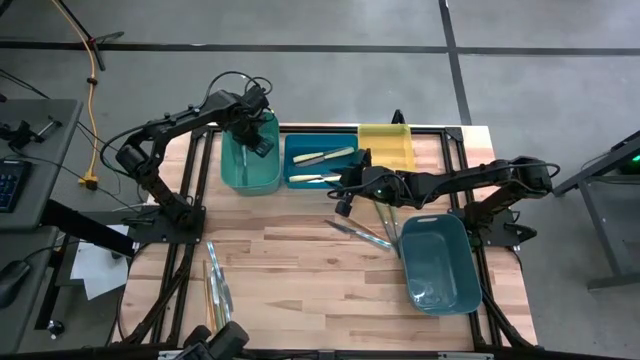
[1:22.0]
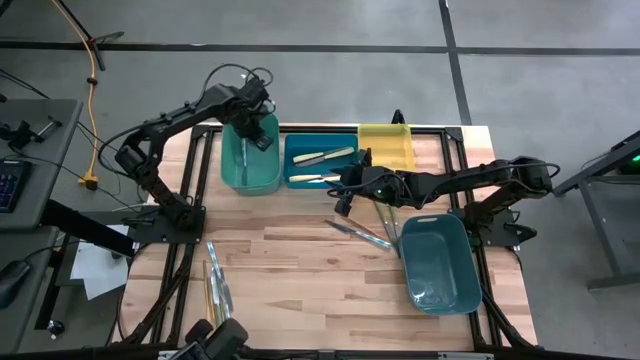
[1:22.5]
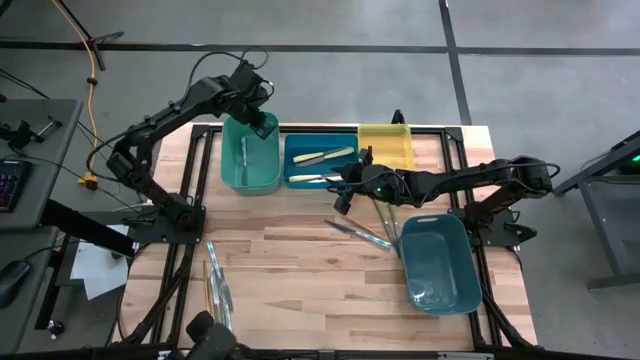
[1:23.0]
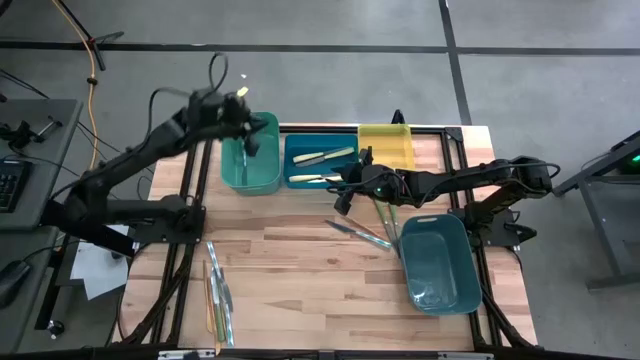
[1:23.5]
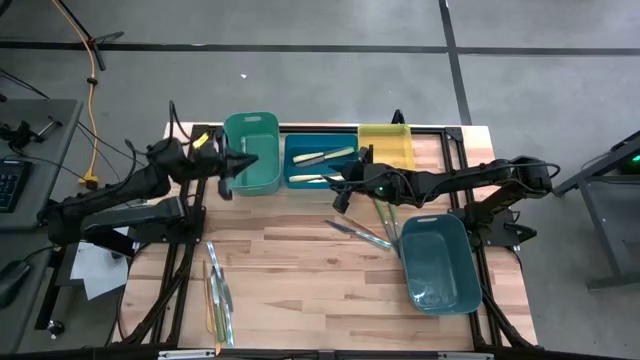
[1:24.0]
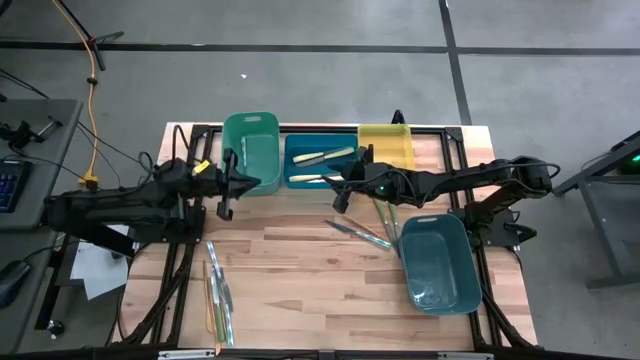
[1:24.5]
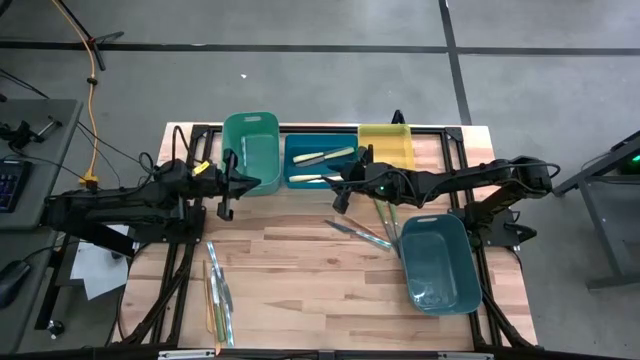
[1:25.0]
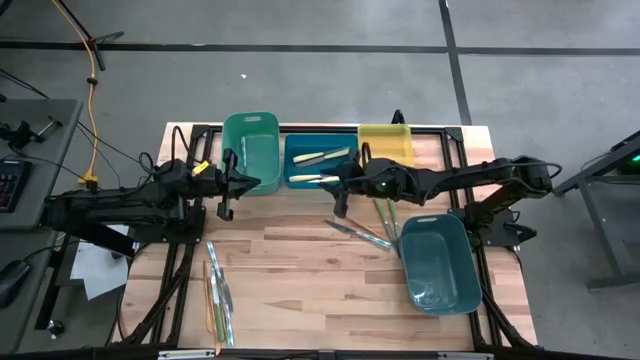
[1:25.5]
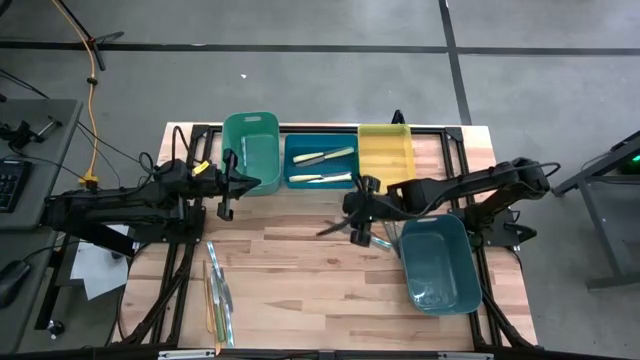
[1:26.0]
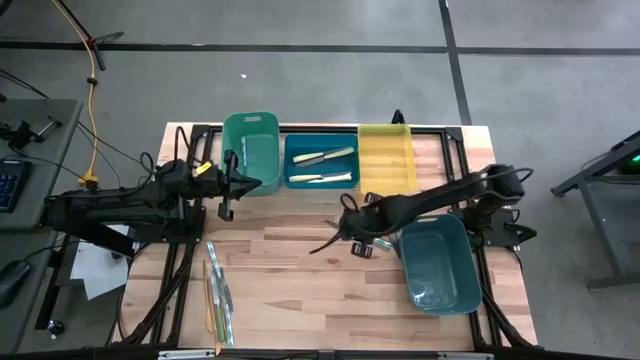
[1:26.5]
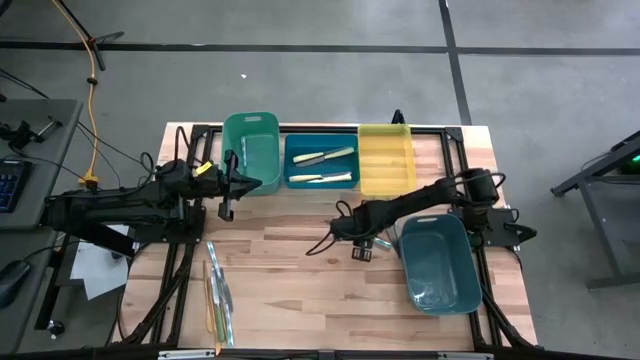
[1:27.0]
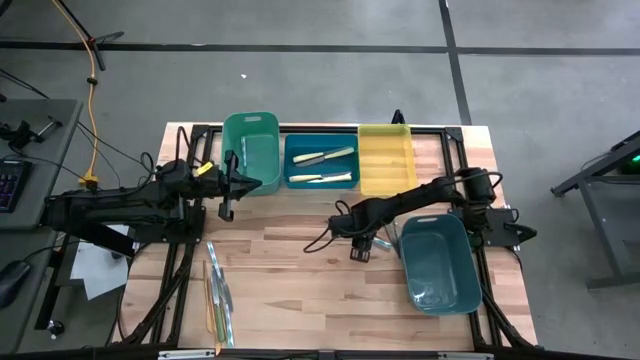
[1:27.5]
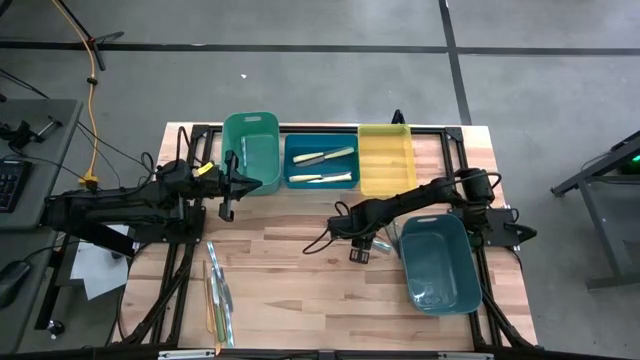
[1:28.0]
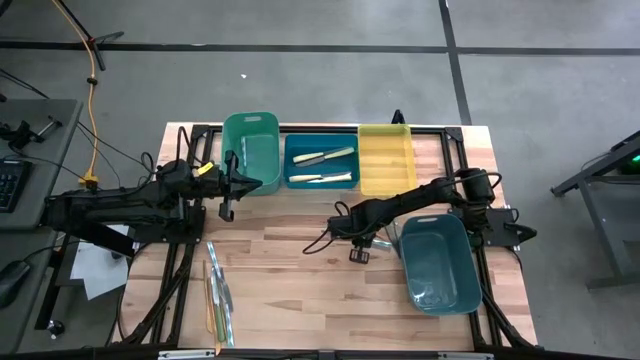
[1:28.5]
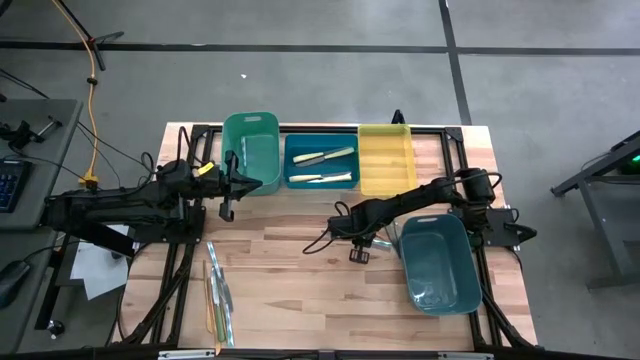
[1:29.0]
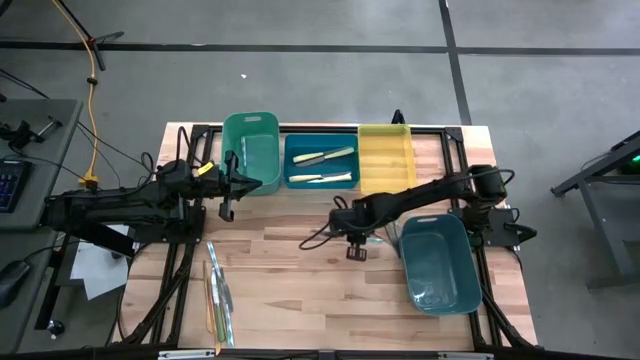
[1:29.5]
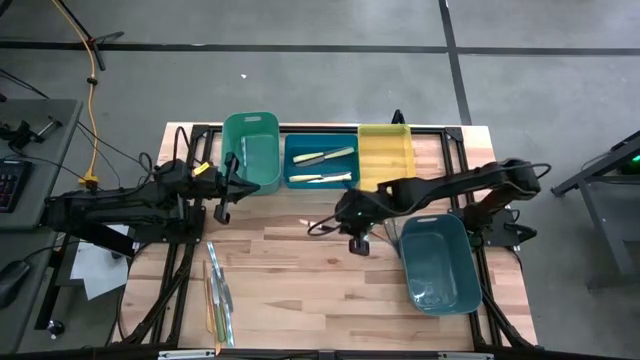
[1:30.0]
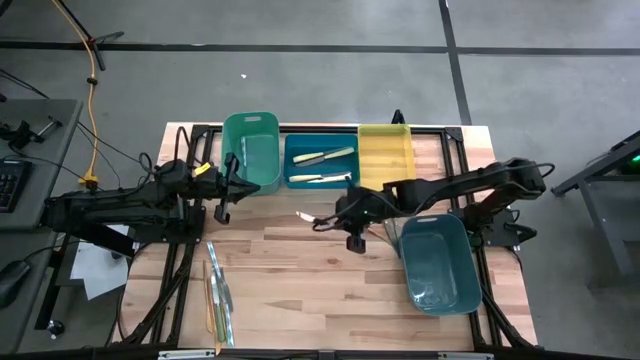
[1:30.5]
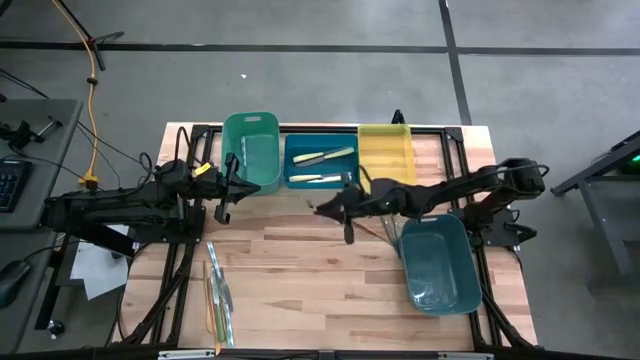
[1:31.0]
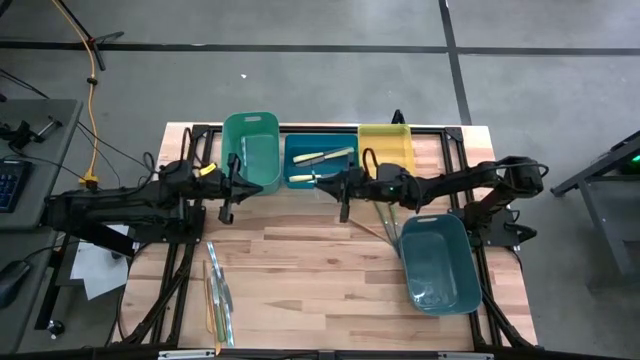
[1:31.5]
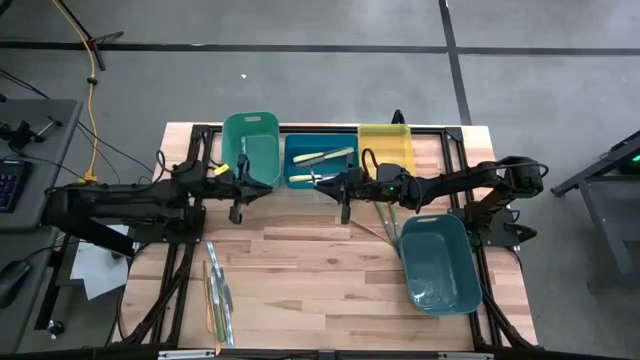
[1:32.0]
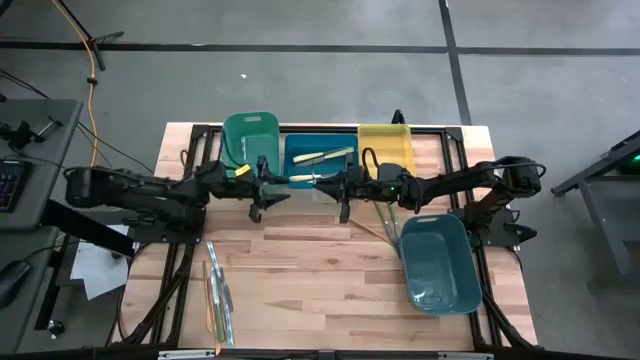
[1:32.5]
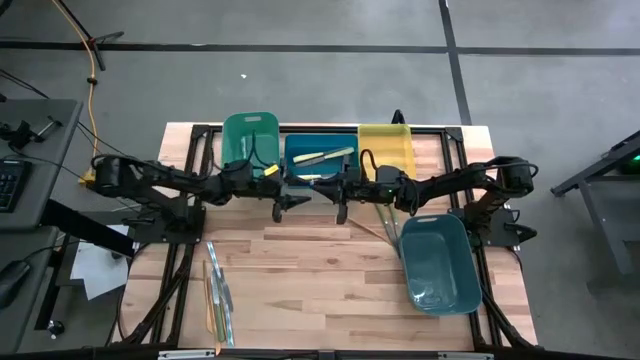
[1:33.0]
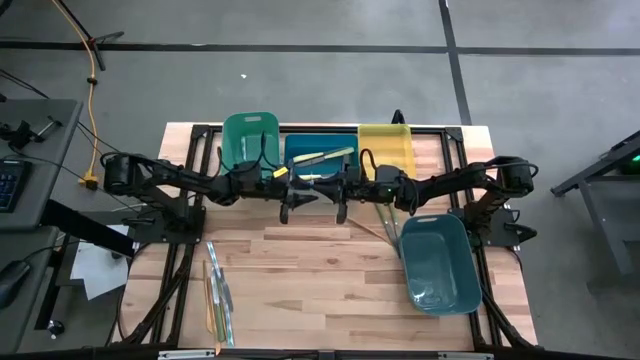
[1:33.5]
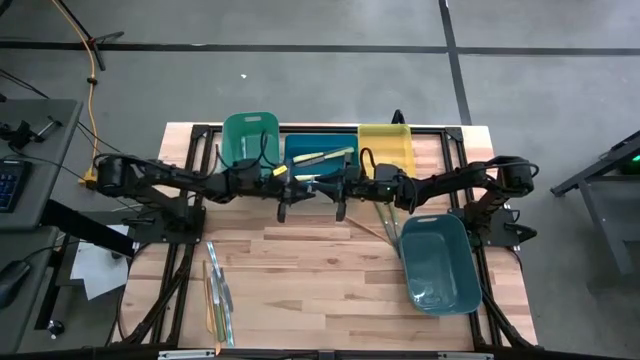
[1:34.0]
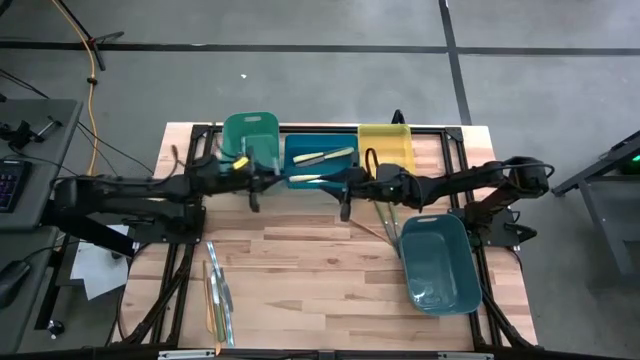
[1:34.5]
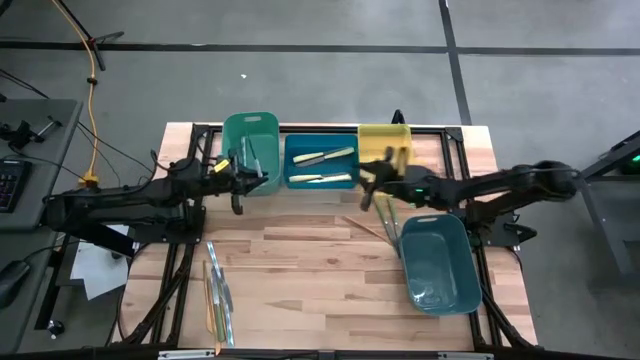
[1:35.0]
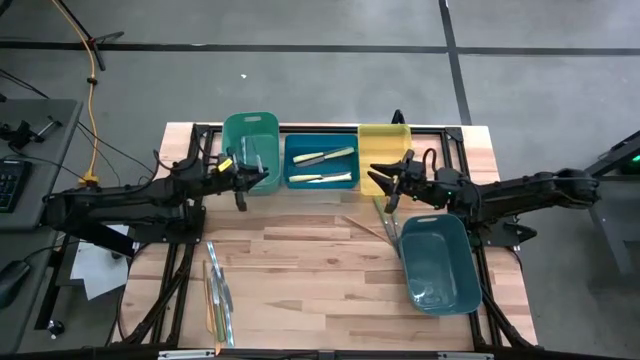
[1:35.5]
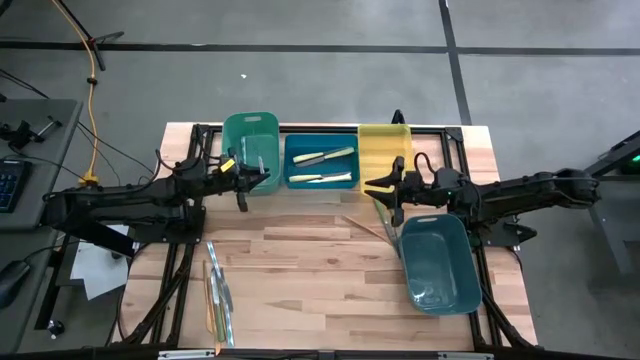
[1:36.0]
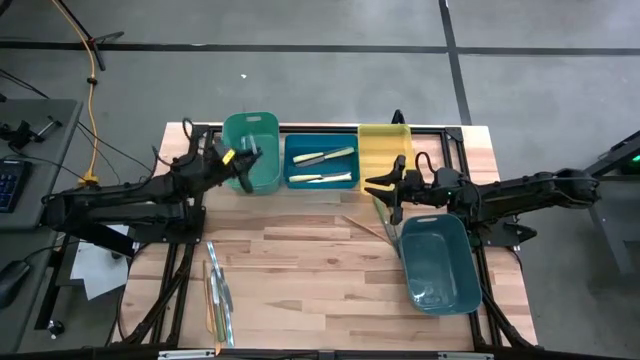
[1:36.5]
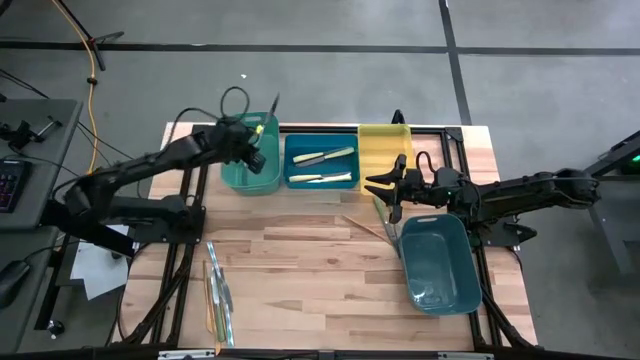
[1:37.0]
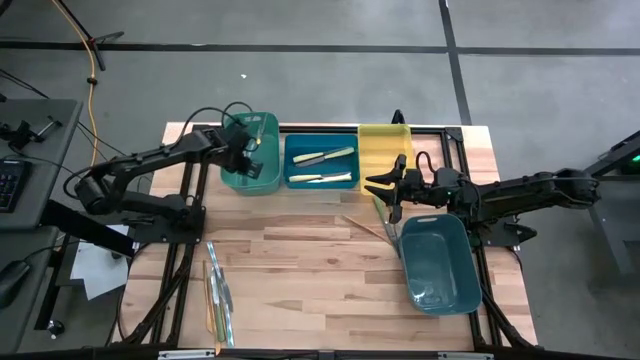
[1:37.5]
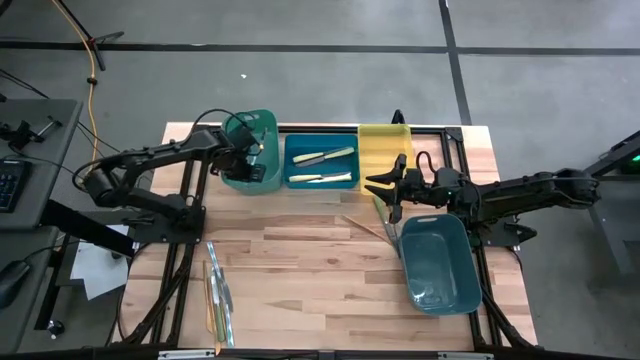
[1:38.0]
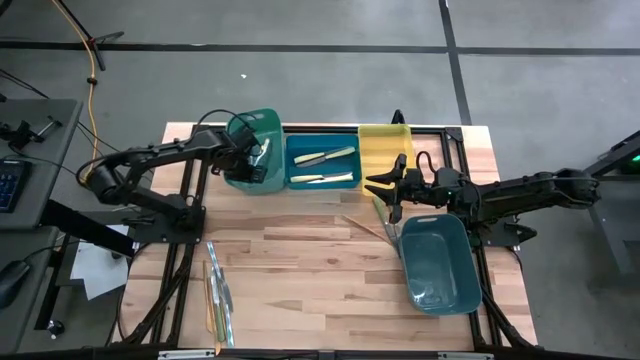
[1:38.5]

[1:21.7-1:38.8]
Task: Sort silverware by color (type)
Put the blue knife into the green bin
